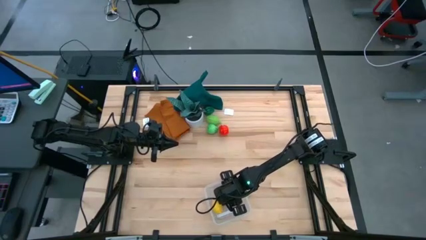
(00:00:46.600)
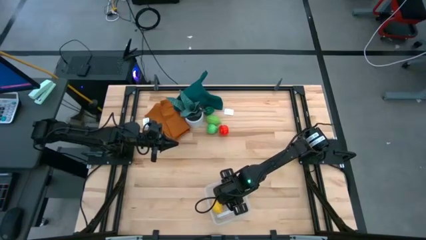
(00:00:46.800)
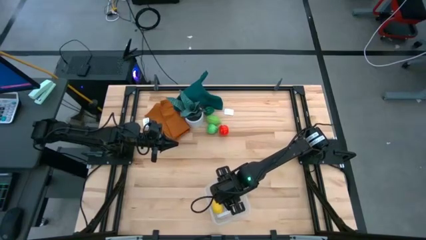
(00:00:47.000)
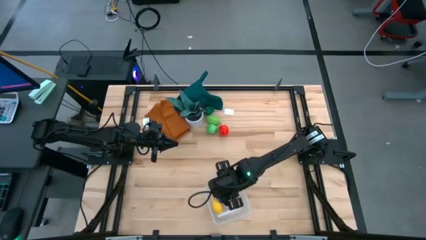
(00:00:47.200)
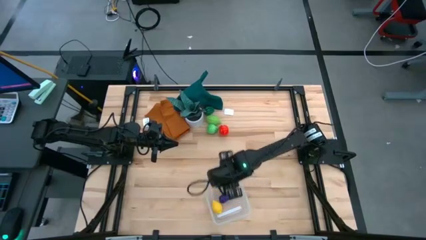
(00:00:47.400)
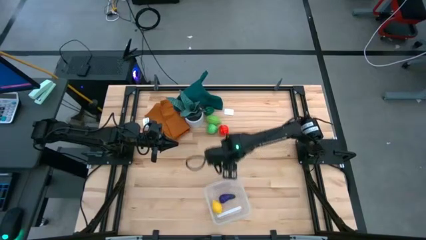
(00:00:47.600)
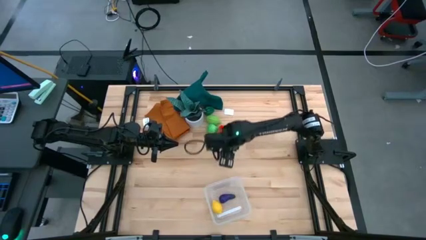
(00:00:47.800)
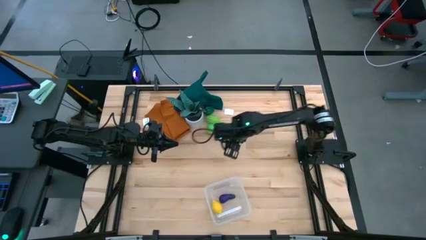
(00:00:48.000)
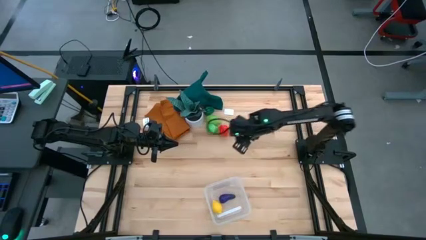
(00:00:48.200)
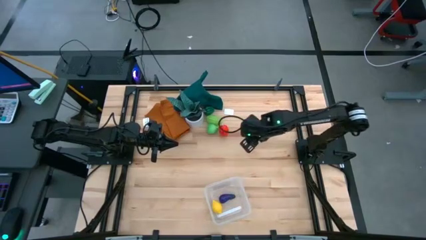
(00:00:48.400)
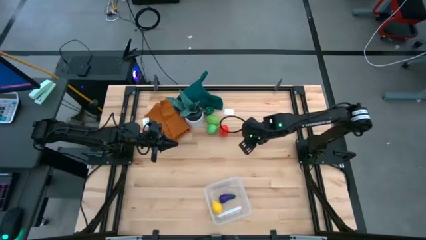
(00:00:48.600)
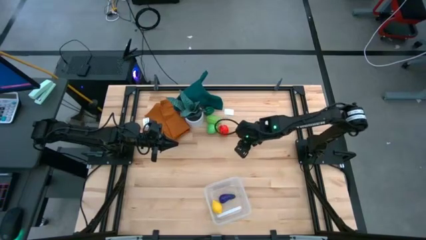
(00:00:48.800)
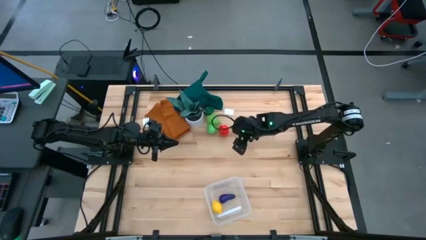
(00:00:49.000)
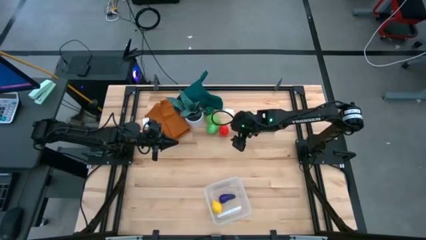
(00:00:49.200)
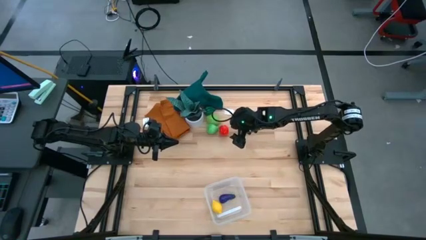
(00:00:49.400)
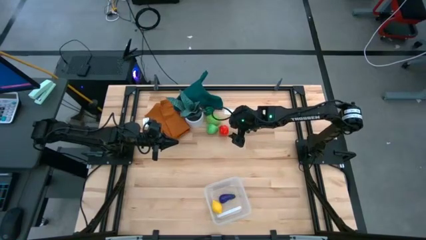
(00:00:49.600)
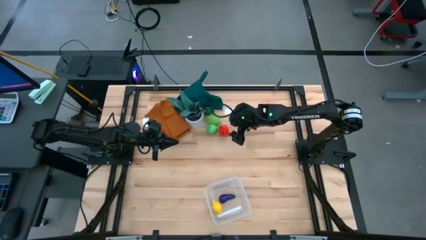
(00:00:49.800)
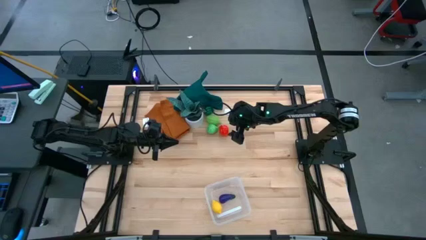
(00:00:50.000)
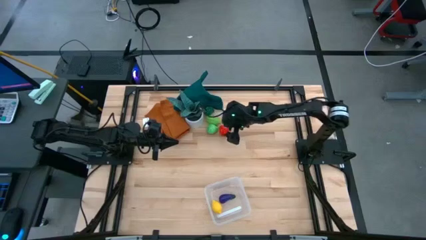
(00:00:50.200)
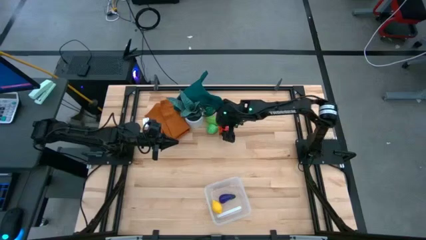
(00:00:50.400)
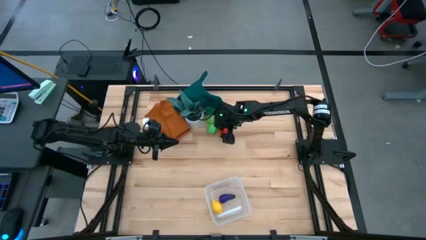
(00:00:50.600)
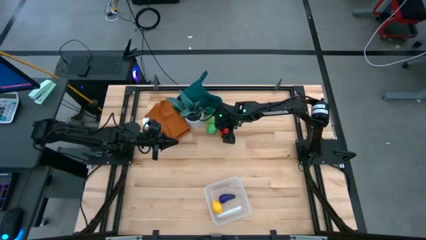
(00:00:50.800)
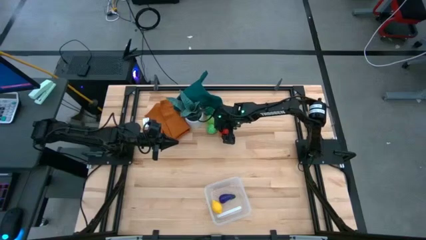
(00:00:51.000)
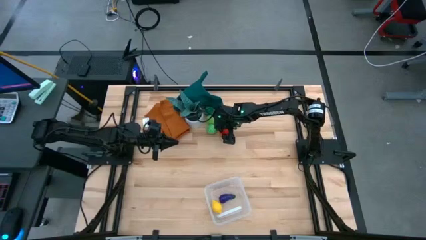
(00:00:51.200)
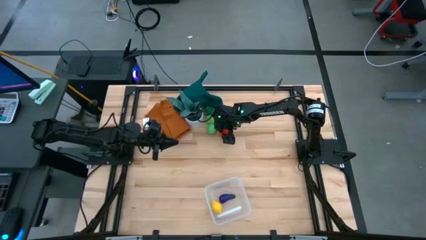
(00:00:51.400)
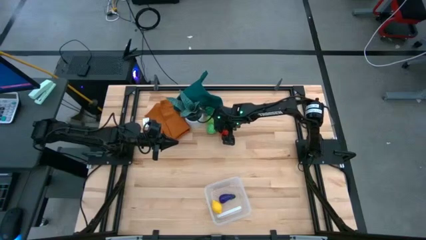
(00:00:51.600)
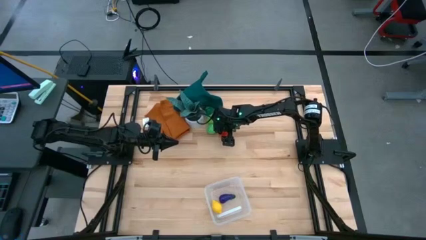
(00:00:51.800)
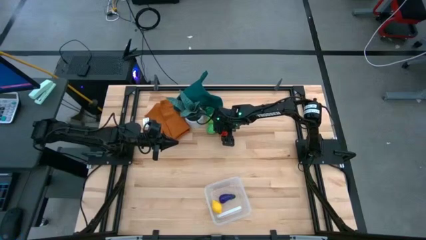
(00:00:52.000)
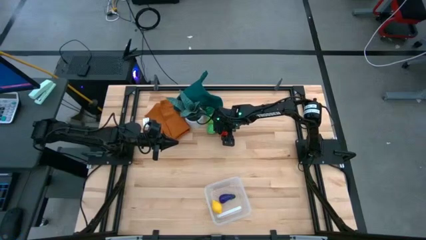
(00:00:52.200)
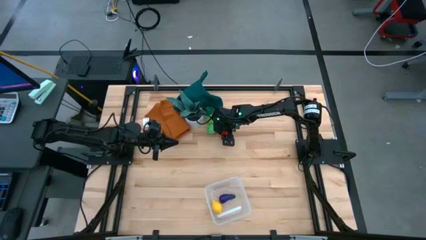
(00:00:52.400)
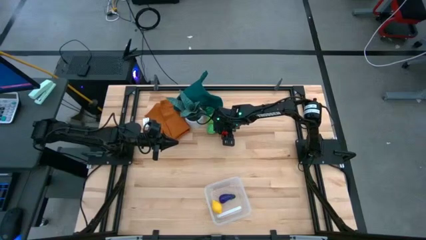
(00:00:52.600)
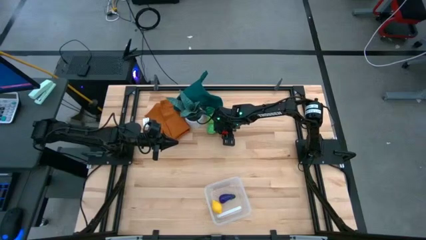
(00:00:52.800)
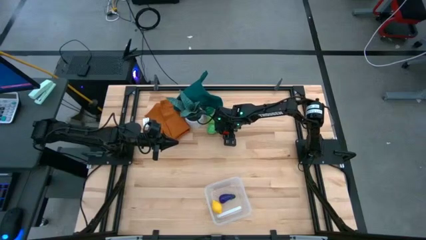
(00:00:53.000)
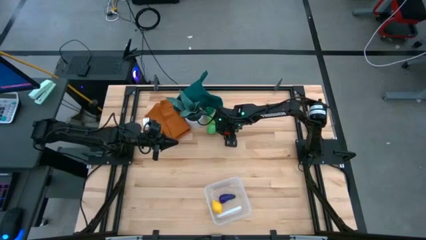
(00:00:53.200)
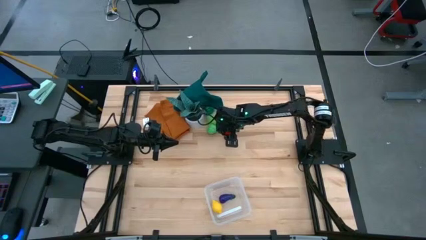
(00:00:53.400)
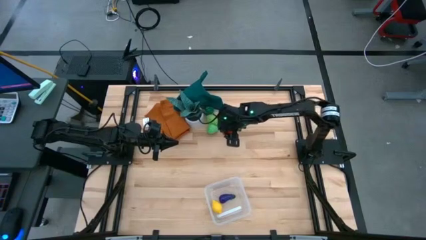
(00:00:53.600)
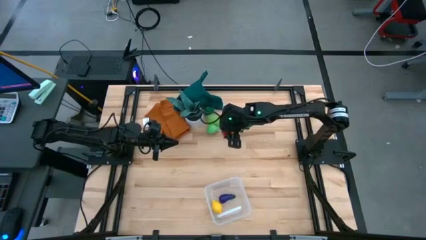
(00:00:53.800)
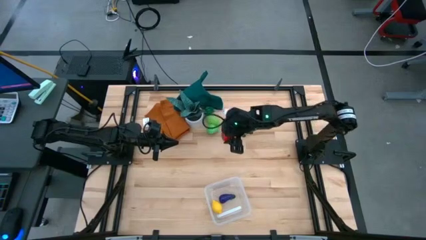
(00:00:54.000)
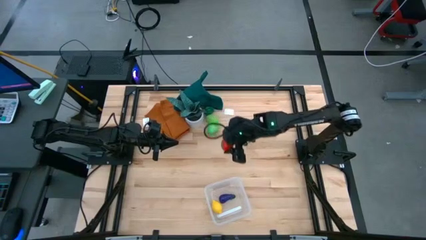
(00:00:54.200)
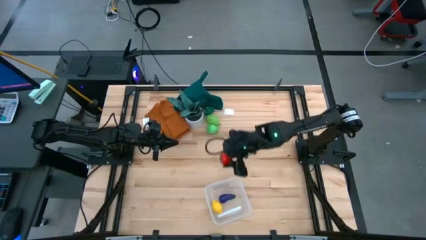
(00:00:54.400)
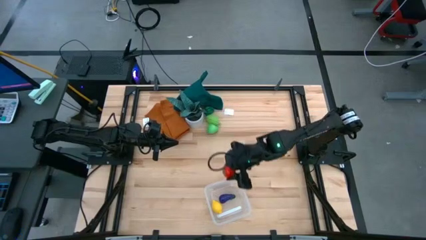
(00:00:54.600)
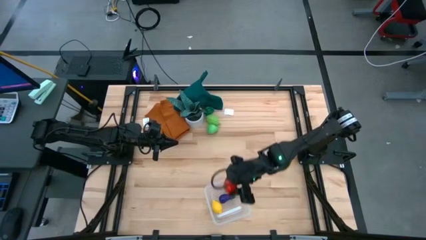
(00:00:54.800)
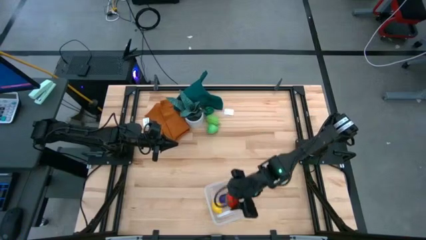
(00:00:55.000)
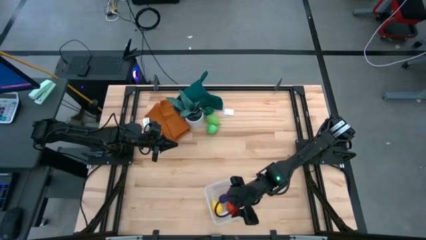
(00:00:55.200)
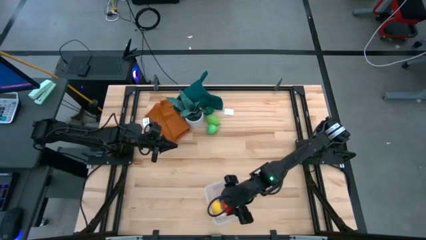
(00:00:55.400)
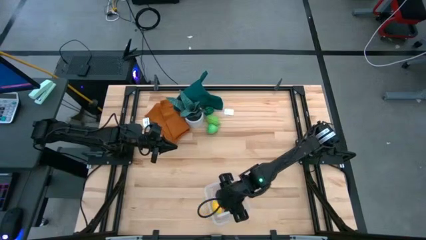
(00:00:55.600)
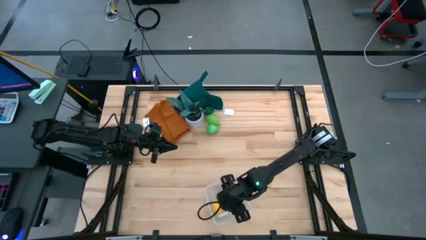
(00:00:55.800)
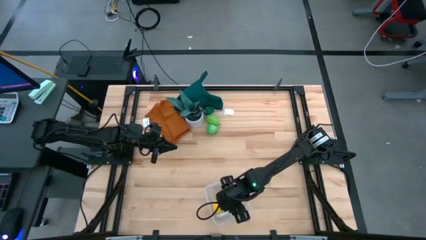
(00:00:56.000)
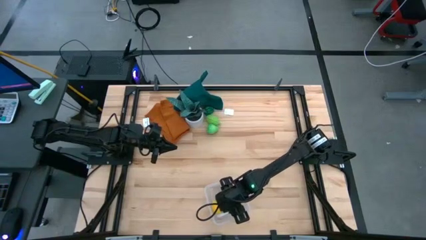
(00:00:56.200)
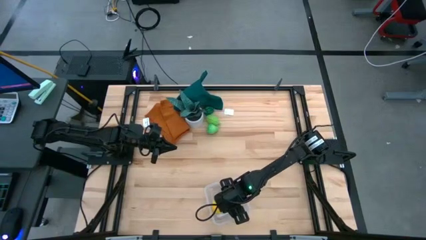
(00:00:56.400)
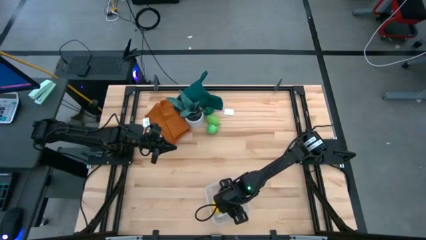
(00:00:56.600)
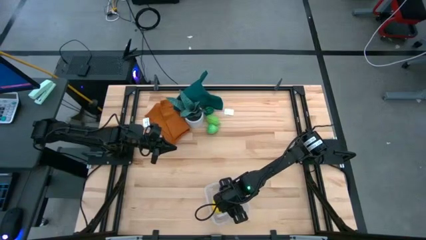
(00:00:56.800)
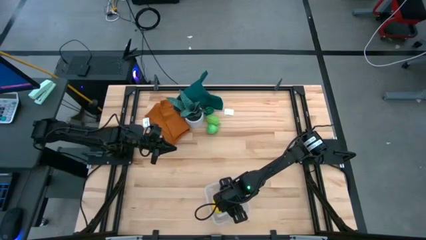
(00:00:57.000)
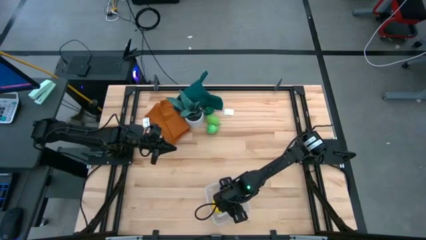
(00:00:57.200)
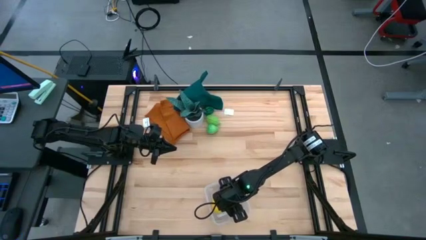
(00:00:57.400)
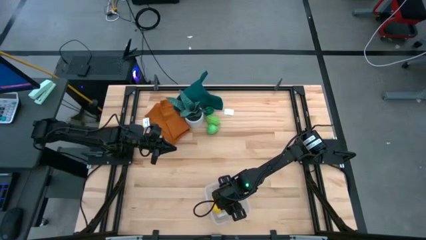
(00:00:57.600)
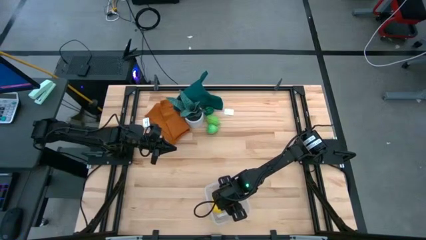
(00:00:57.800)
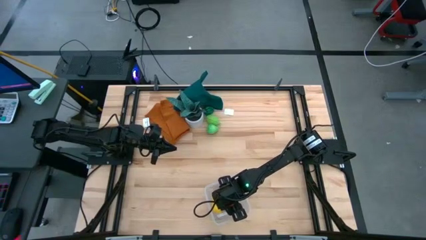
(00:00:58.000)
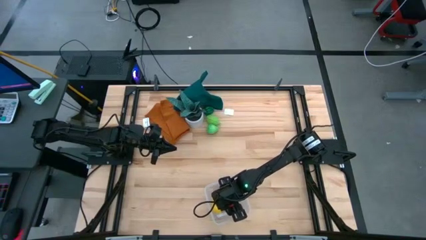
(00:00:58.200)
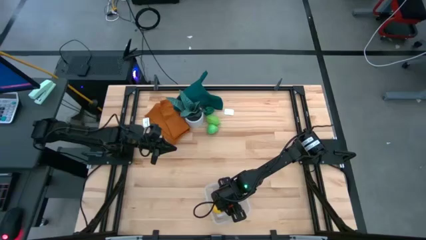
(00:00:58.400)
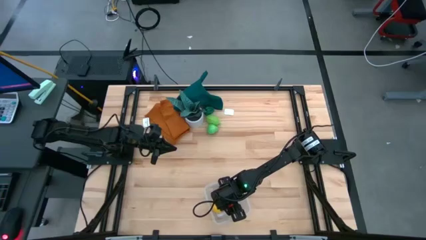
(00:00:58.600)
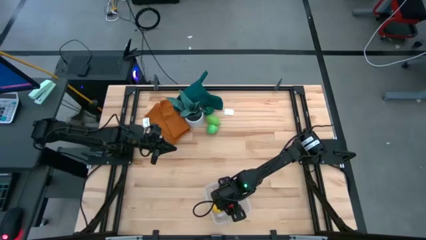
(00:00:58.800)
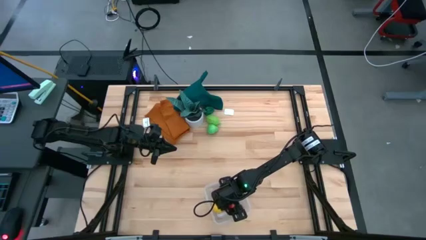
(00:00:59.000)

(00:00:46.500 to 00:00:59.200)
Task: Pick and placing Produce into tupperware
Put the tomato into the transparent bin
